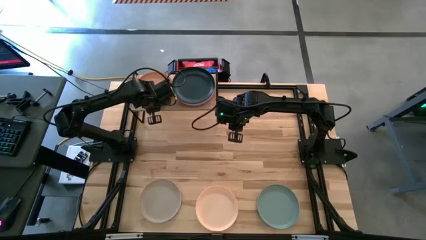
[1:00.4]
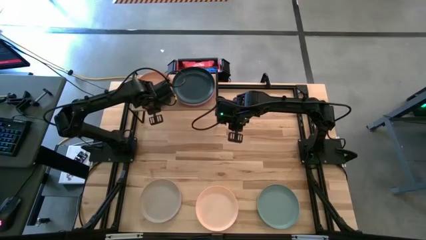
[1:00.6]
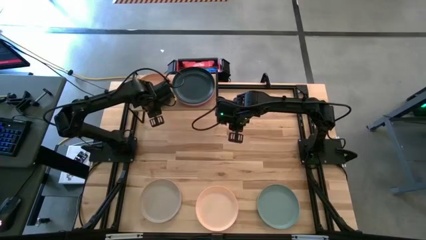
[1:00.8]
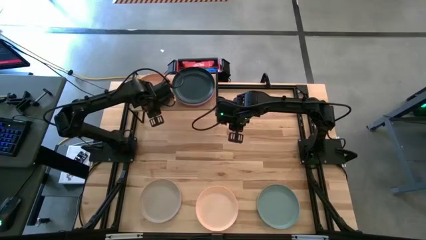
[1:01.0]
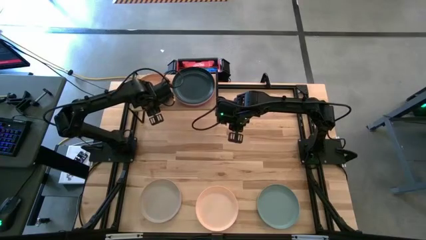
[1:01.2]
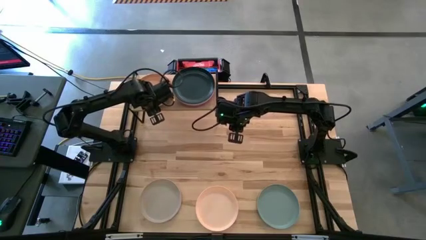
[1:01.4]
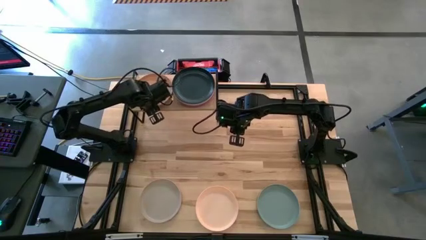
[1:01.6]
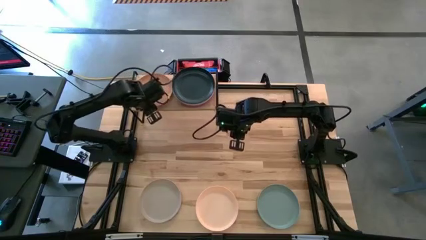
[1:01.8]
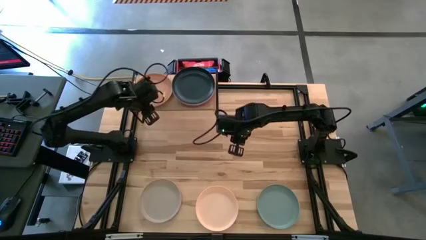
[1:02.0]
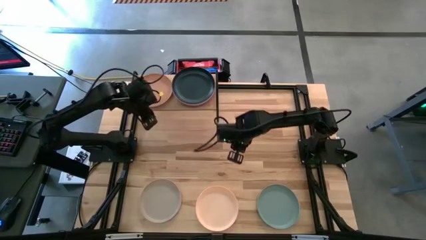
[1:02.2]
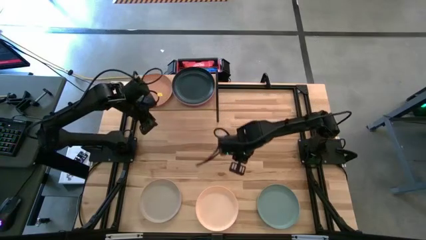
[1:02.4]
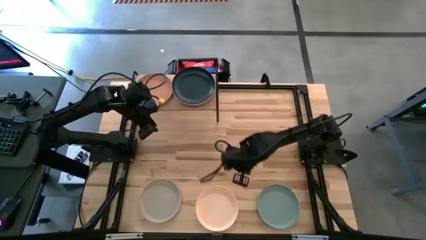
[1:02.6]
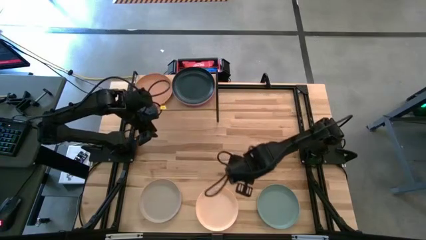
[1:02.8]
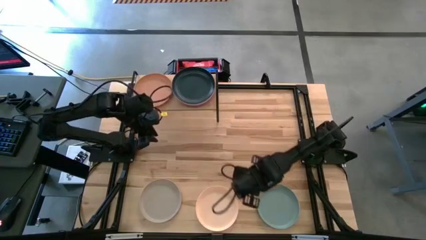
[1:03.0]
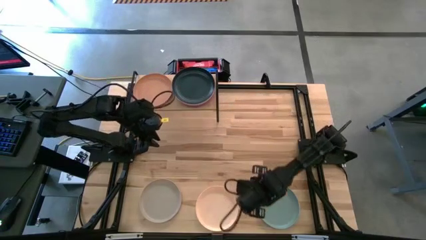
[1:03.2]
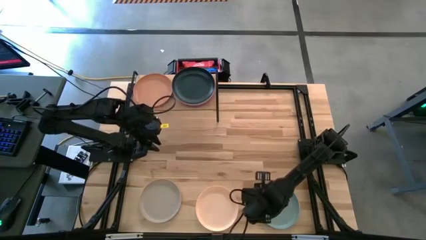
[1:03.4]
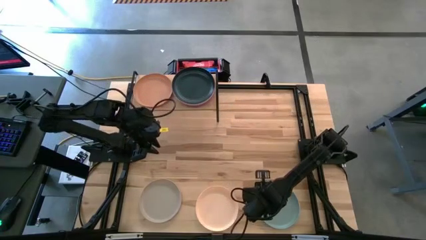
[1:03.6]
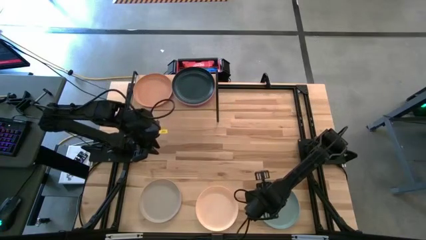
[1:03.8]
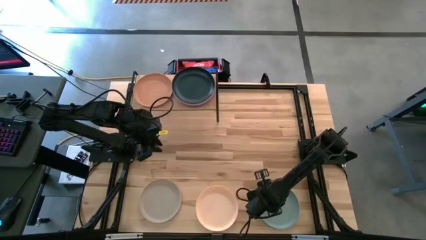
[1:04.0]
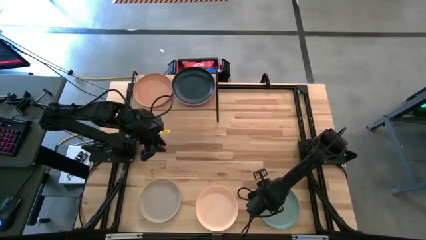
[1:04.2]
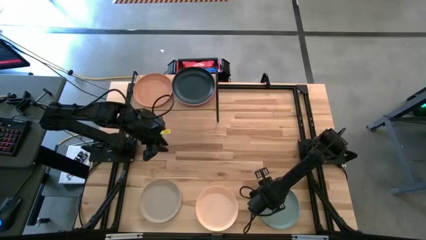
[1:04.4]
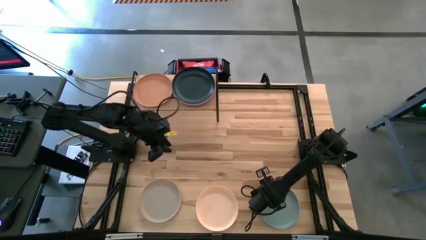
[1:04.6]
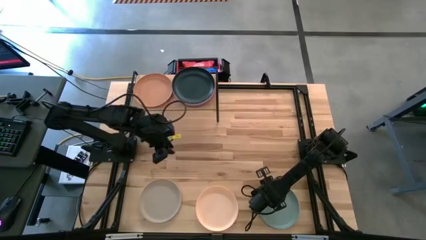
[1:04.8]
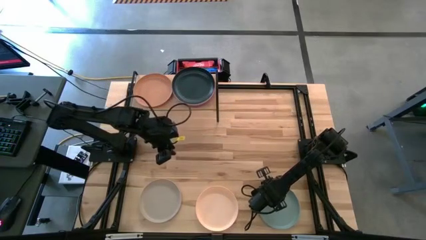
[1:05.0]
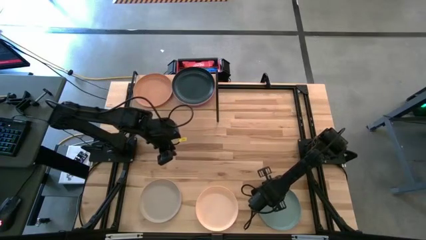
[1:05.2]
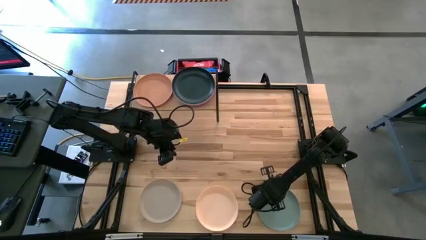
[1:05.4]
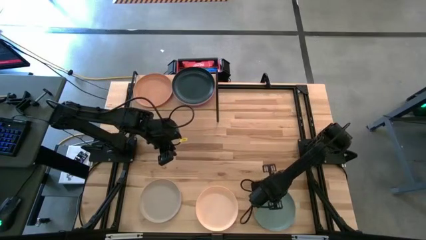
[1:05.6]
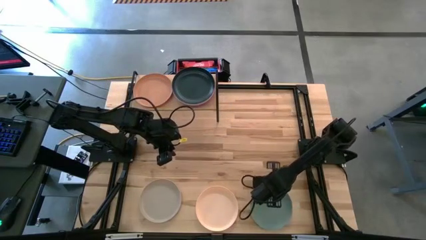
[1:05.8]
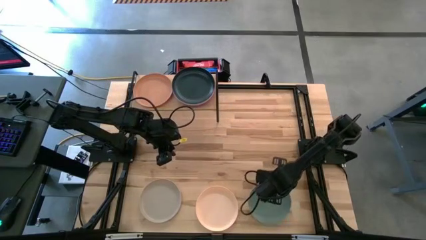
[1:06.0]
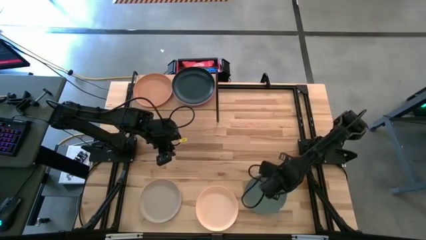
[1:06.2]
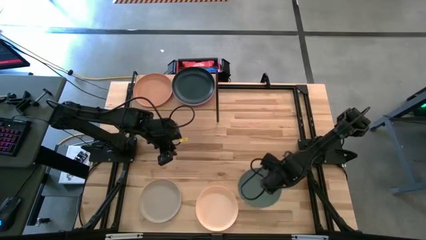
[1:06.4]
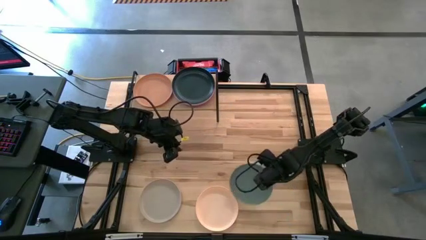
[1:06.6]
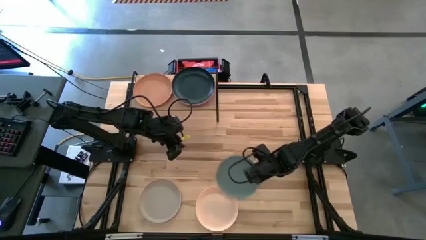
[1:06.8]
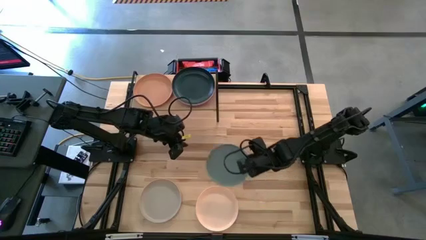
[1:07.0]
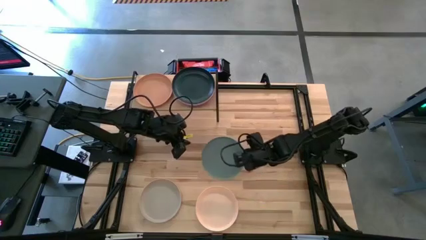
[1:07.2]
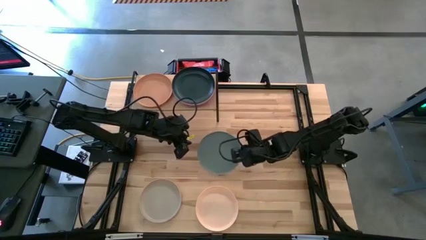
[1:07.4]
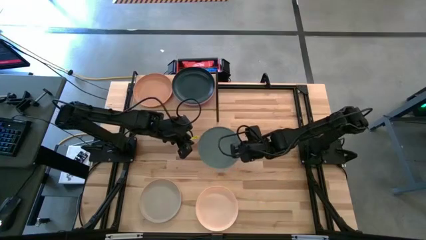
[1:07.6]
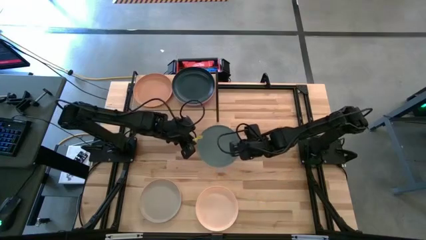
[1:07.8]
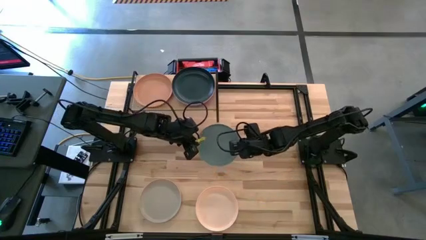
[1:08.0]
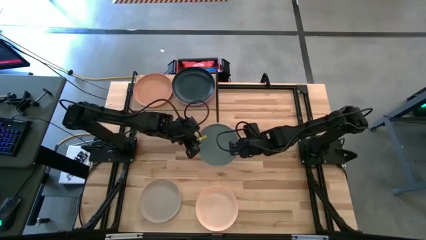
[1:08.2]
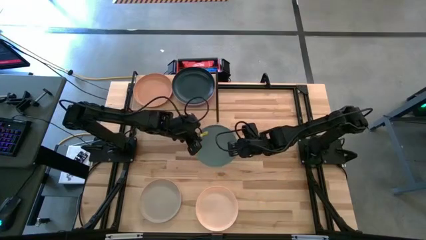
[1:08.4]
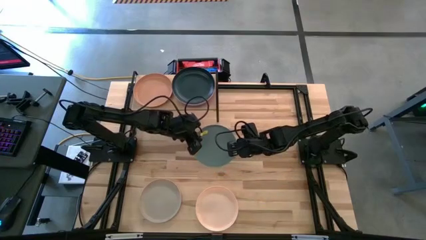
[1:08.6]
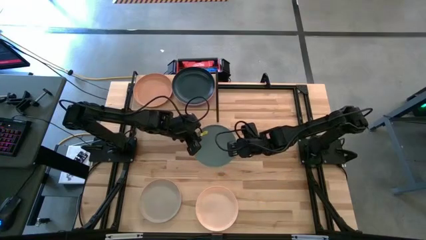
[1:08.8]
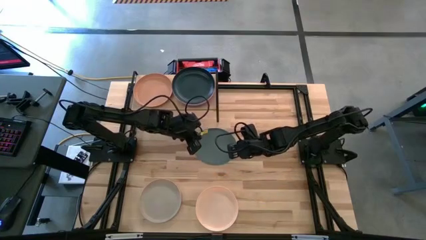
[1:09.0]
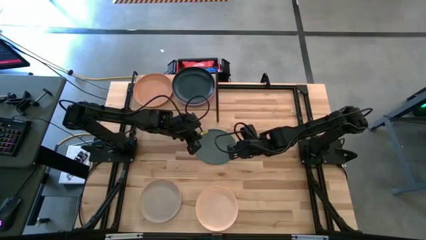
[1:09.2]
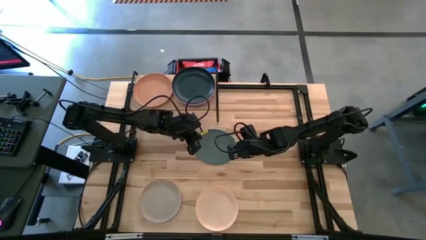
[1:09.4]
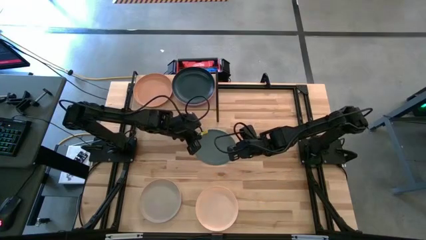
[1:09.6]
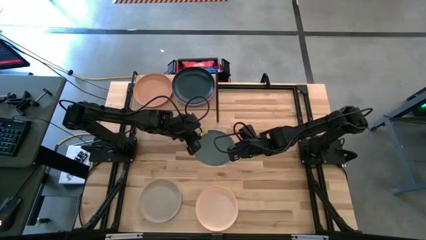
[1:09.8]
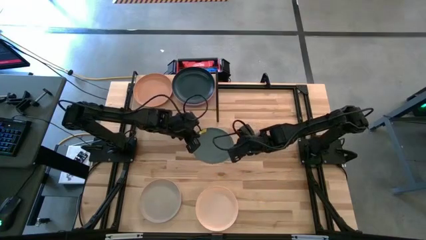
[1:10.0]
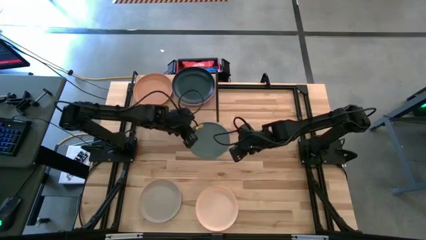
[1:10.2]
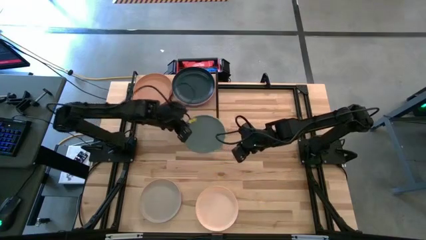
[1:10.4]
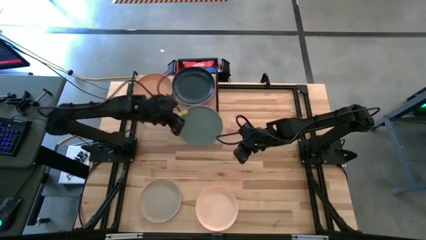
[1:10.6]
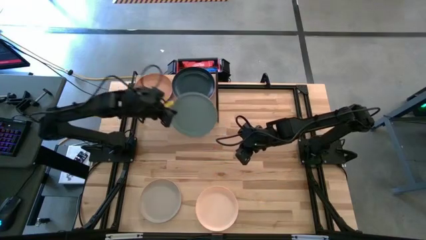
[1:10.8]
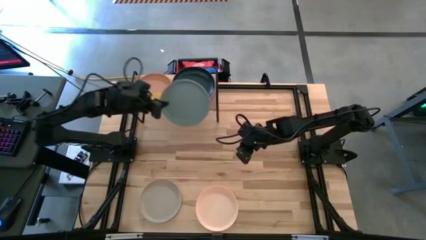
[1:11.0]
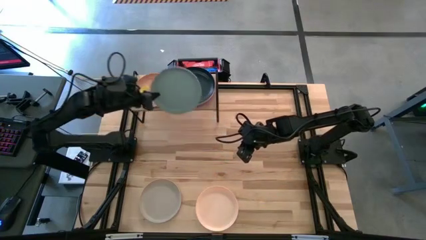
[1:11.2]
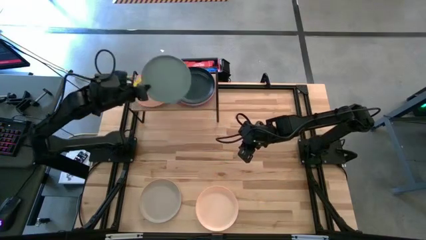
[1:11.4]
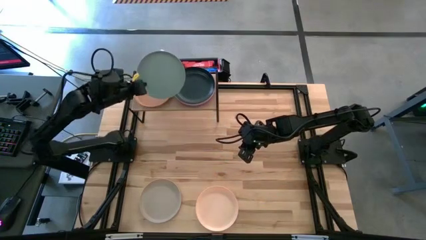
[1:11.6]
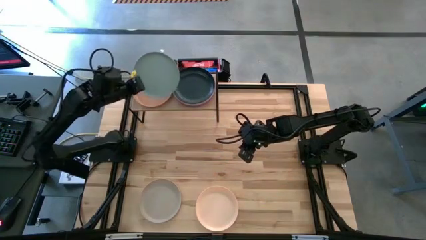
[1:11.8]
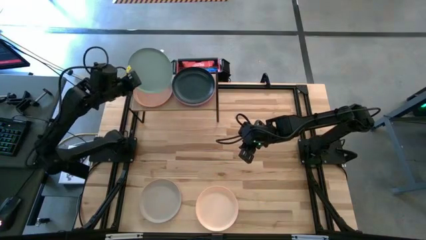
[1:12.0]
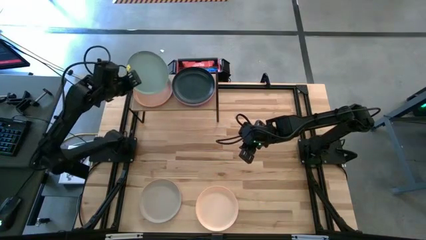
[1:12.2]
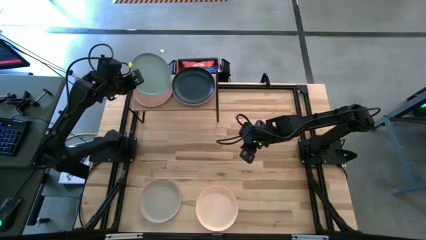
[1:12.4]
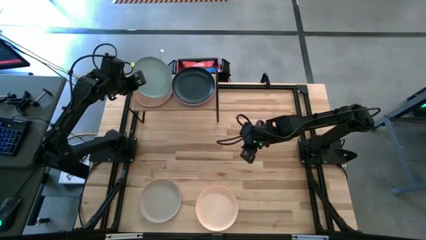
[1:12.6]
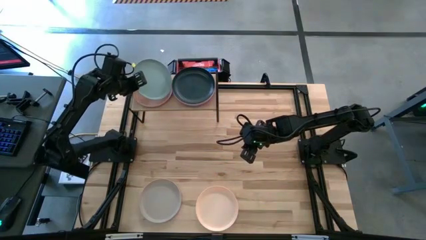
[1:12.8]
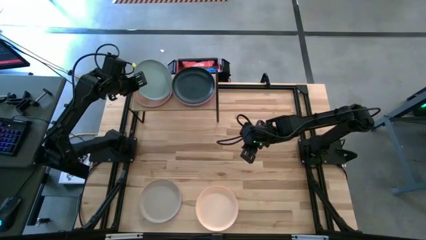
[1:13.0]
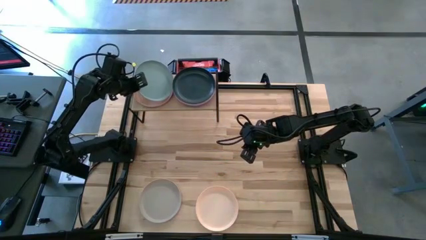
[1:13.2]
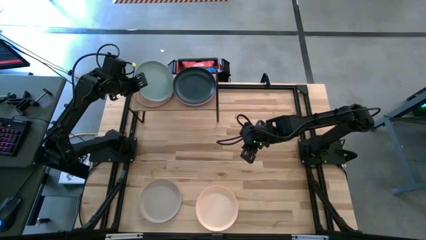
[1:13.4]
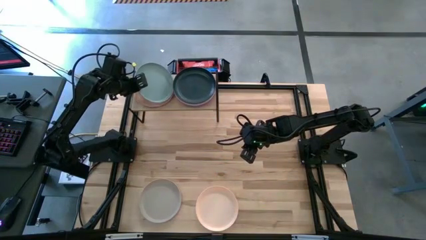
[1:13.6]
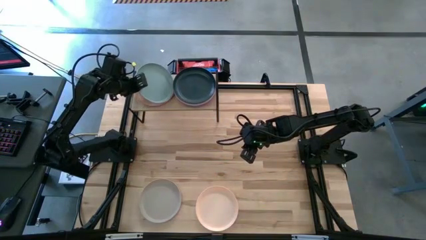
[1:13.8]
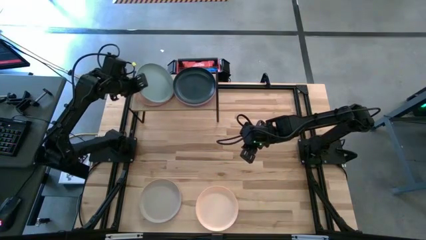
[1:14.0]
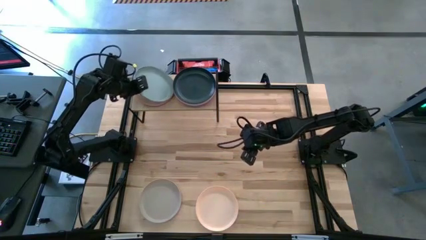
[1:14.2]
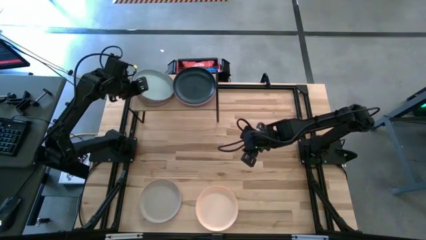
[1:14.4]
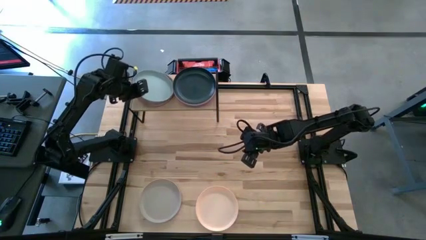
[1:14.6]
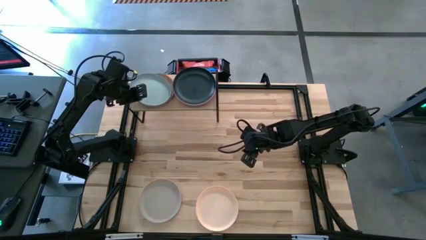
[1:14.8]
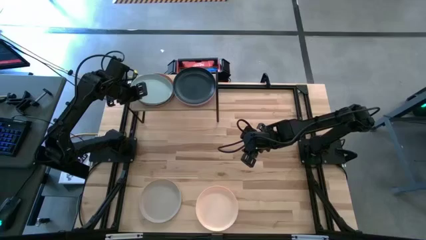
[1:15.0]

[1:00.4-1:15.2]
Task: Place and stack plates onto a shelf
Stack the blue plate on top of the light orange plate on the shelf
